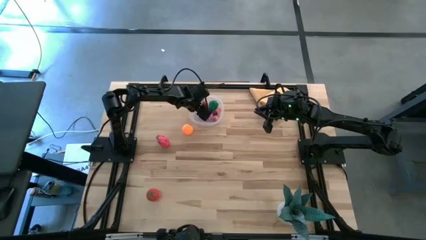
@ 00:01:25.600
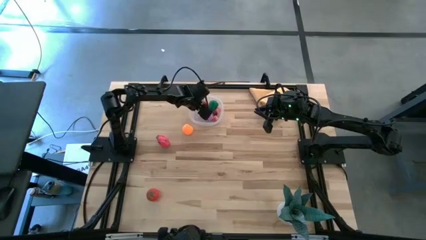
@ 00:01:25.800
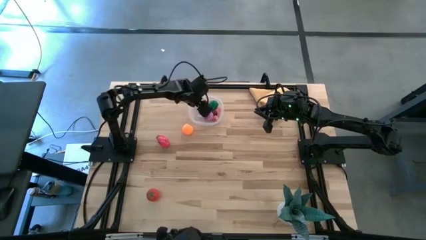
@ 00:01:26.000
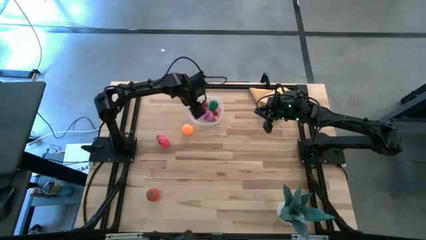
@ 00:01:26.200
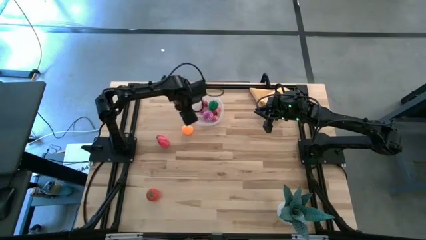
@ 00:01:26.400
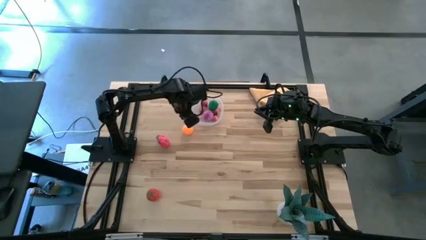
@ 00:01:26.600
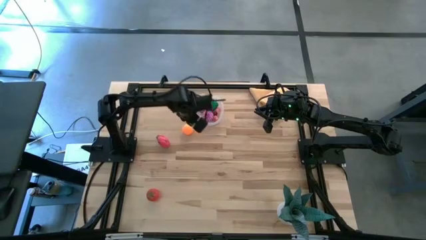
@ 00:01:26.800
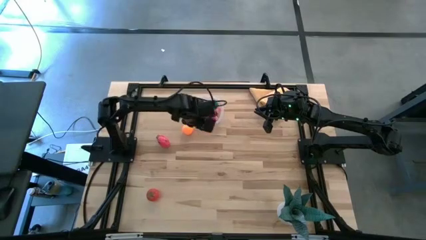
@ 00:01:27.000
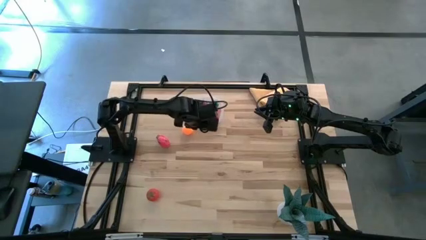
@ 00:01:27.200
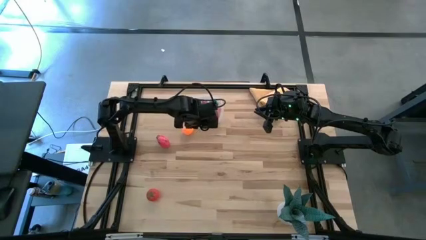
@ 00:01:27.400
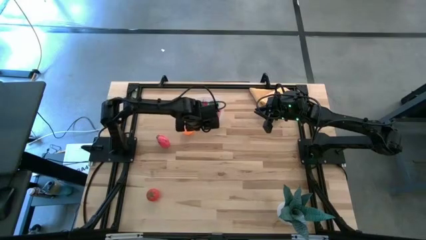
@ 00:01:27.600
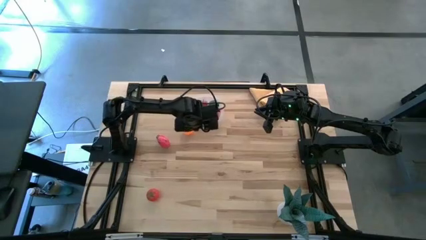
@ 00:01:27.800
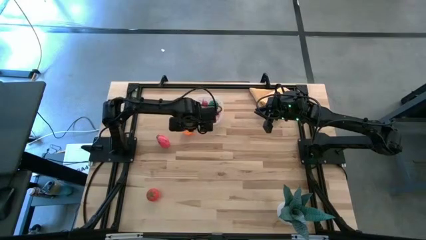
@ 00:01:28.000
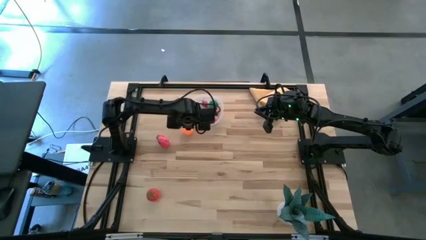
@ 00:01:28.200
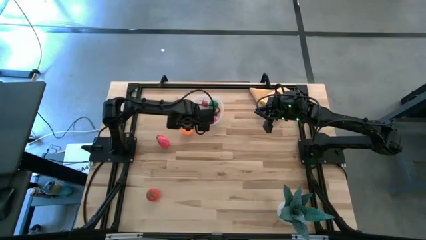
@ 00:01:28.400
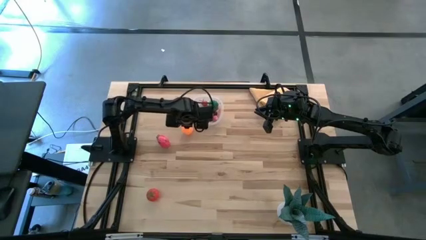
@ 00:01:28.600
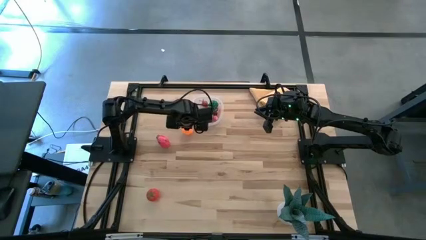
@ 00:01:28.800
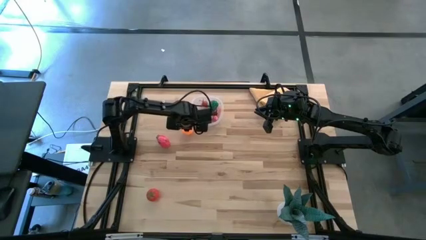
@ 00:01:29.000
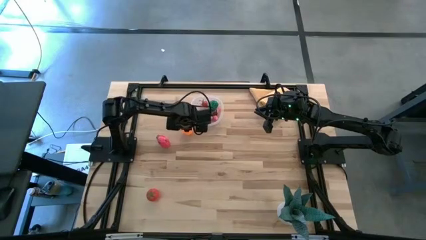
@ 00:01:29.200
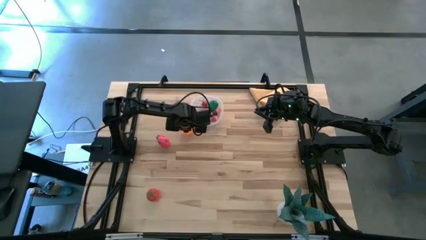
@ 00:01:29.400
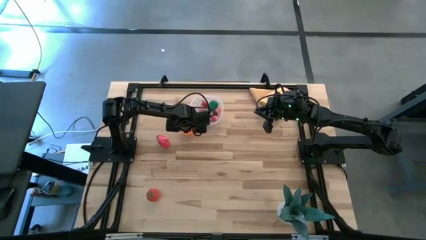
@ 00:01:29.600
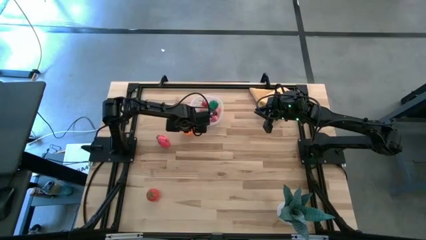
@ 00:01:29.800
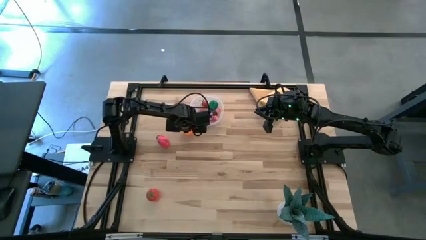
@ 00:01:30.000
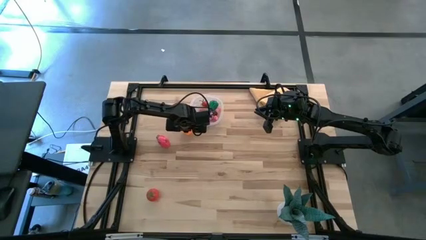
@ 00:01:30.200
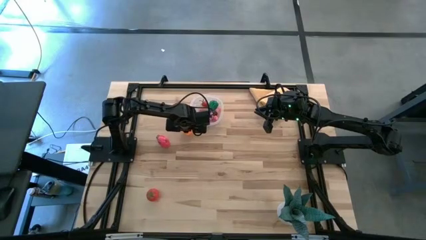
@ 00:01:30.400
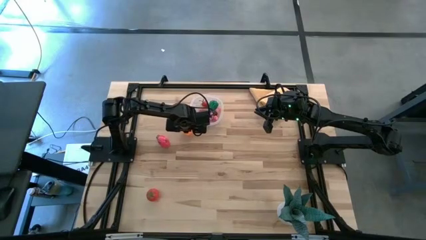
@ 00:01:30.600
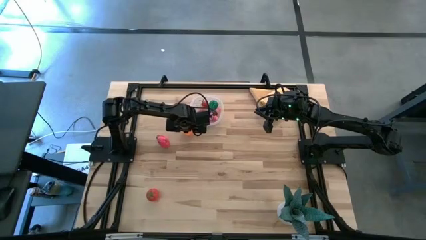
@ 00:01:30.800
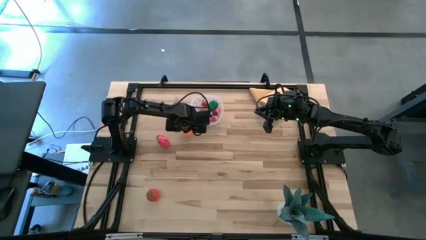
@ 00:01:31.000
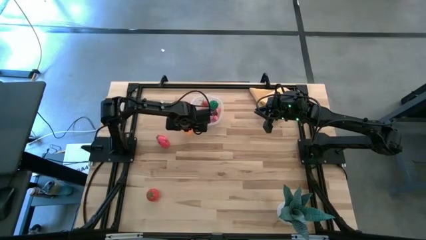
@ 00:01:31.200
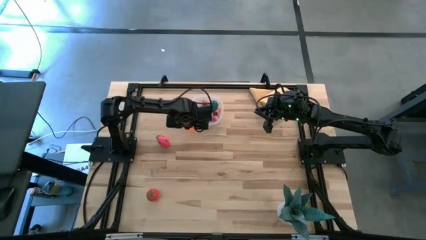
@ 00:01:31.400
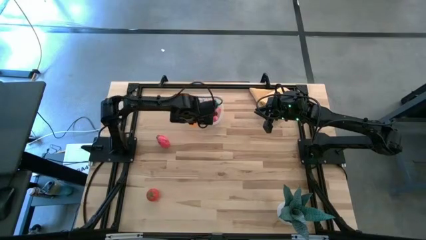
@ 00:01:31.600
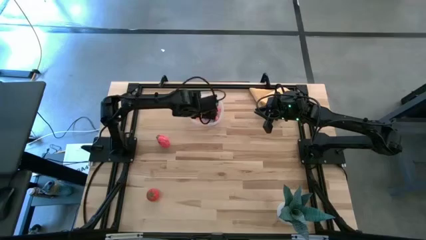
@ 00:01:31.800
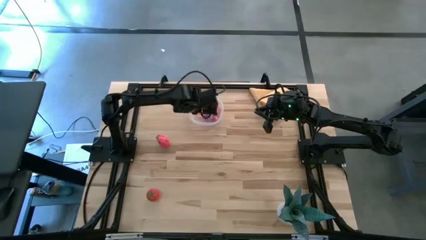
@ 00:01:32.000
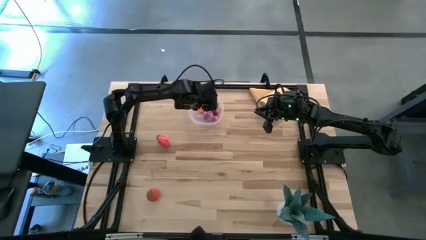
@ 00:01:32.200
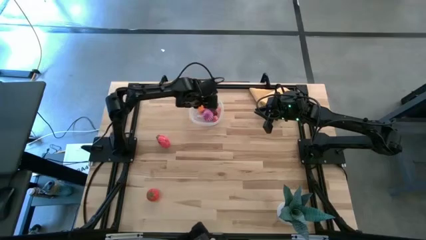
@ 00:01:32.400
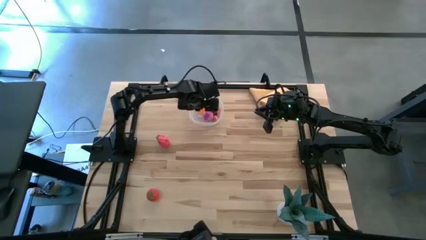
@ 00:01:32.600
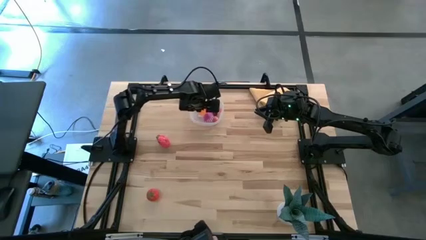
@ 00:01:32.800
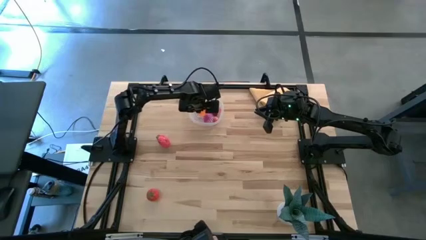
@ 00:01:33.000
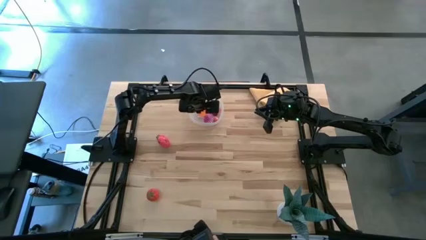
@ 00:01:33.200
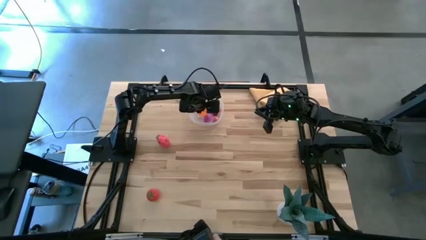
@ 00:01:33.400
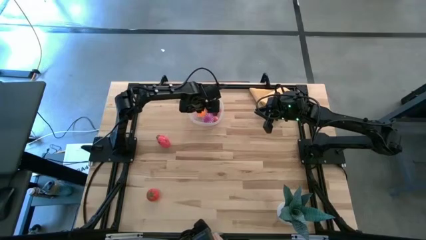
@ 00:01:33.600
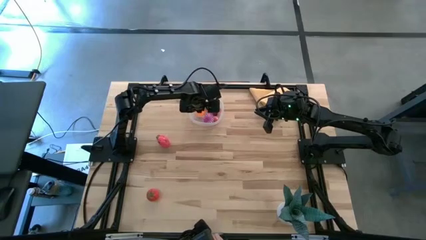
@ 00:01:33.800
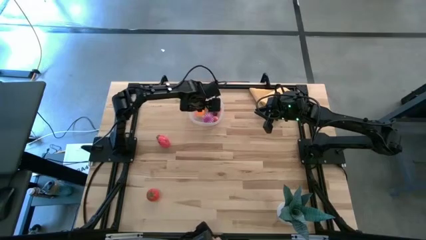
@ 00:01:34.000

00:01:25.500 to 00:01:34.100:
Task: Pick and placing Produce into tupperware
Put the orange into the transparent bin

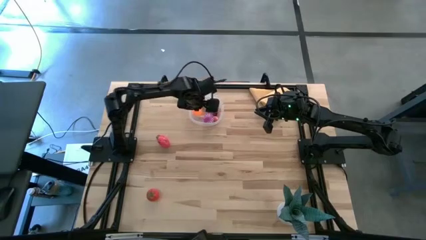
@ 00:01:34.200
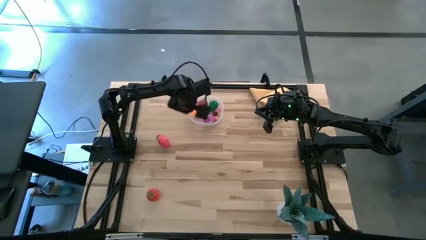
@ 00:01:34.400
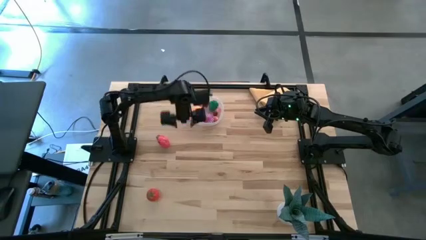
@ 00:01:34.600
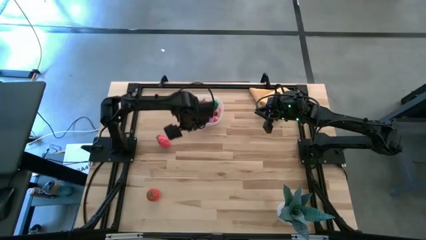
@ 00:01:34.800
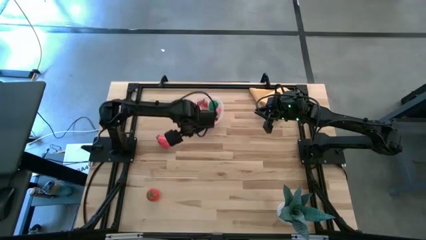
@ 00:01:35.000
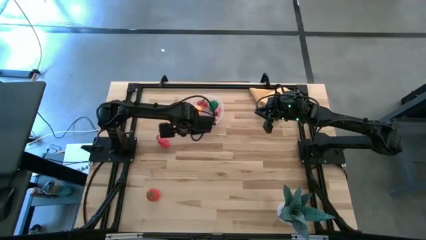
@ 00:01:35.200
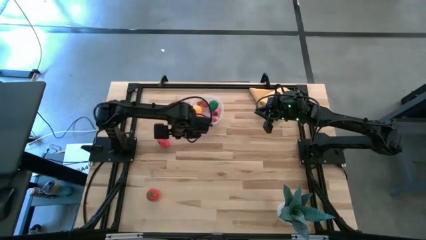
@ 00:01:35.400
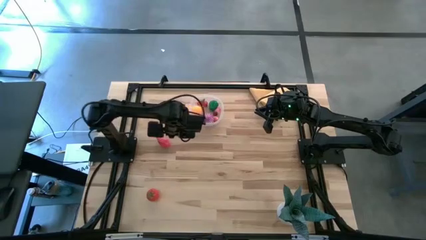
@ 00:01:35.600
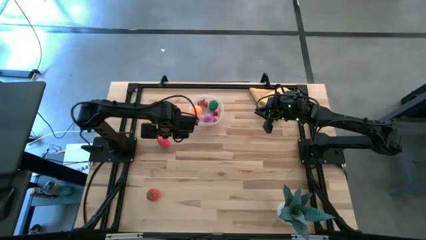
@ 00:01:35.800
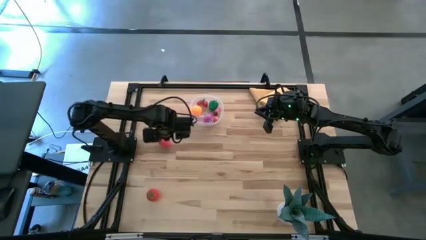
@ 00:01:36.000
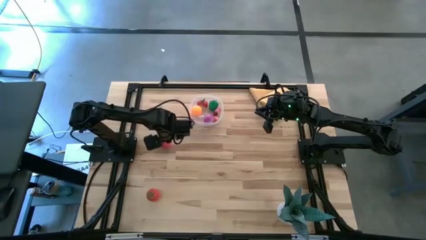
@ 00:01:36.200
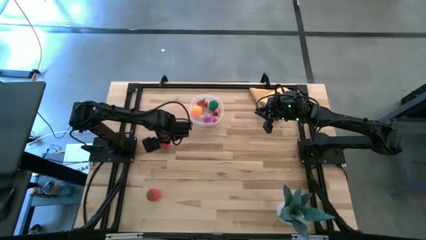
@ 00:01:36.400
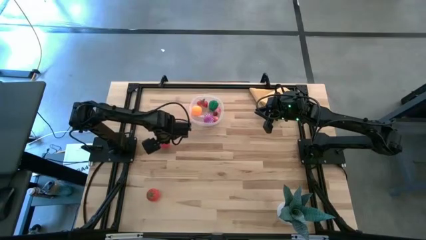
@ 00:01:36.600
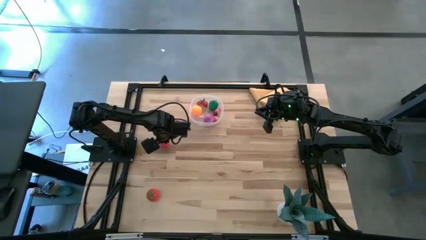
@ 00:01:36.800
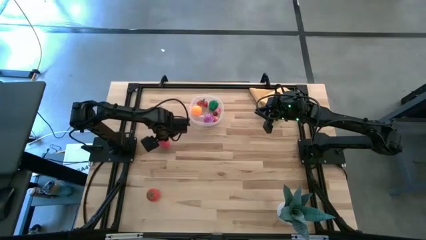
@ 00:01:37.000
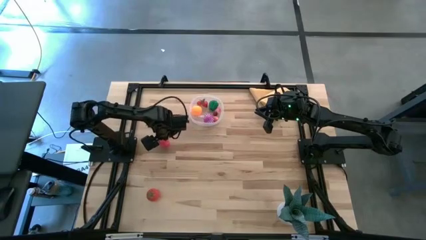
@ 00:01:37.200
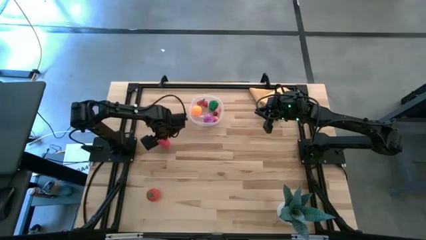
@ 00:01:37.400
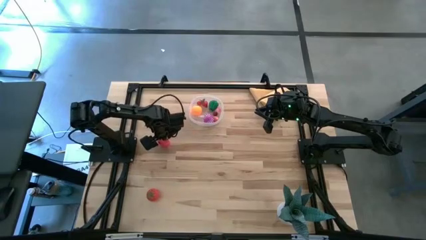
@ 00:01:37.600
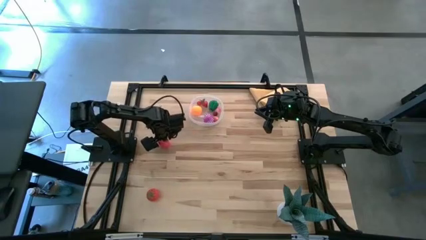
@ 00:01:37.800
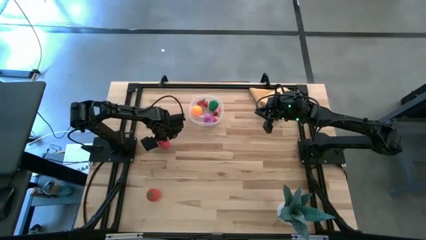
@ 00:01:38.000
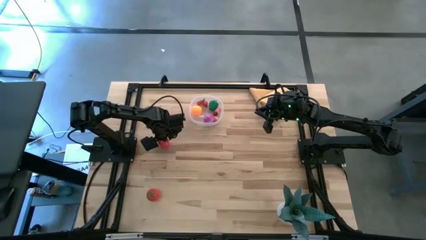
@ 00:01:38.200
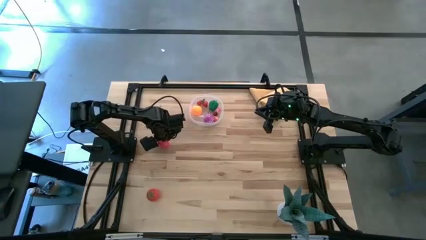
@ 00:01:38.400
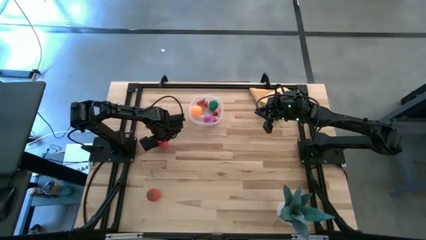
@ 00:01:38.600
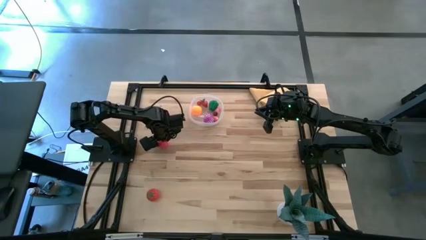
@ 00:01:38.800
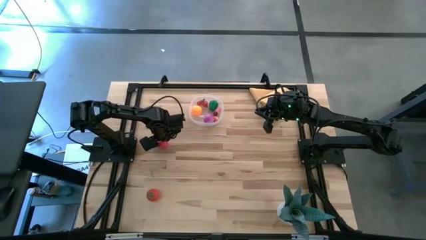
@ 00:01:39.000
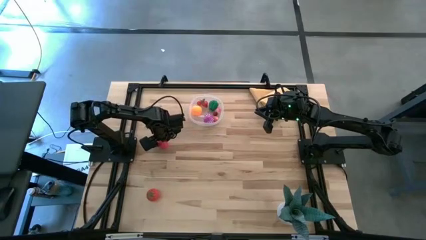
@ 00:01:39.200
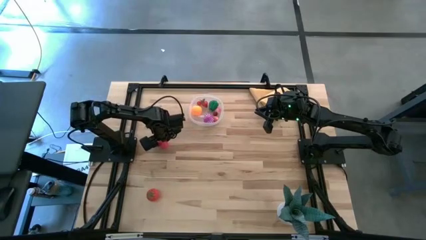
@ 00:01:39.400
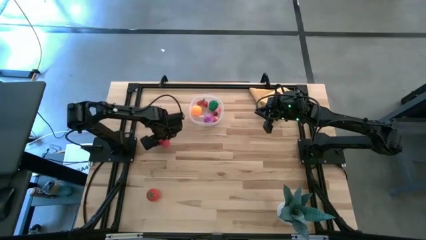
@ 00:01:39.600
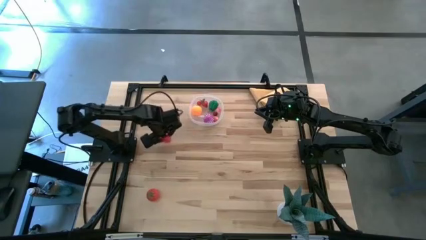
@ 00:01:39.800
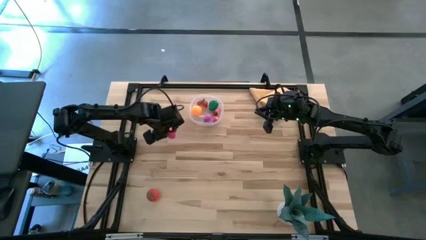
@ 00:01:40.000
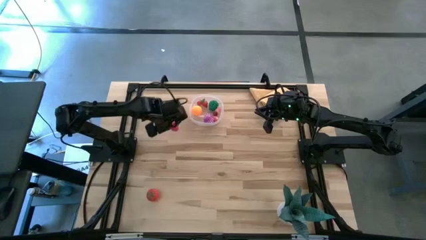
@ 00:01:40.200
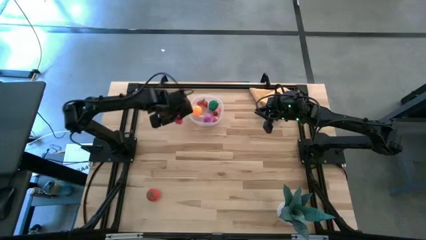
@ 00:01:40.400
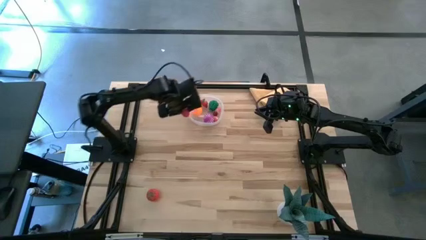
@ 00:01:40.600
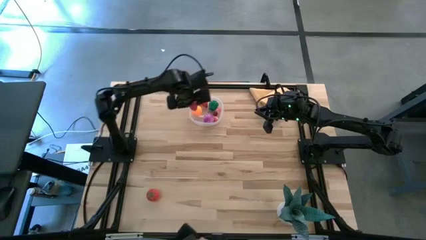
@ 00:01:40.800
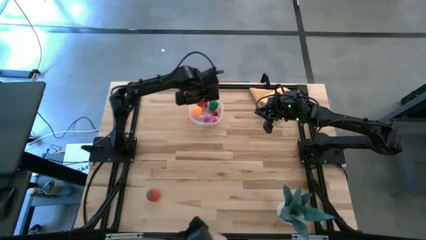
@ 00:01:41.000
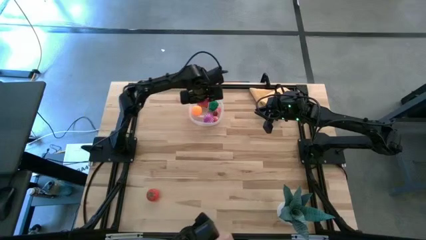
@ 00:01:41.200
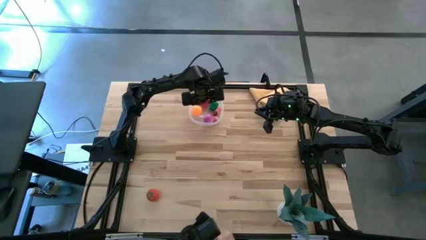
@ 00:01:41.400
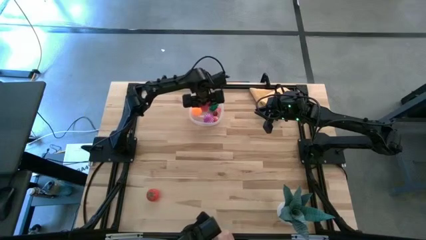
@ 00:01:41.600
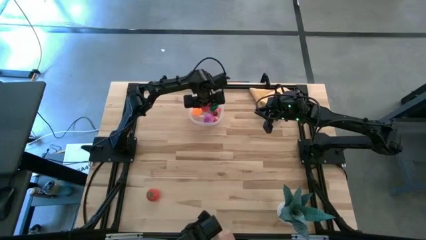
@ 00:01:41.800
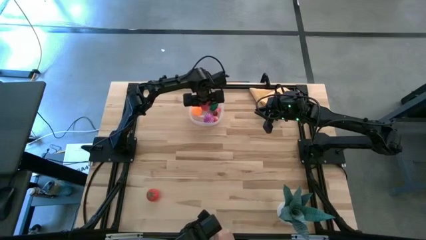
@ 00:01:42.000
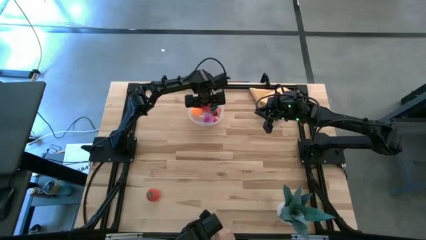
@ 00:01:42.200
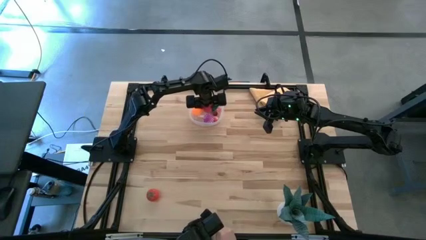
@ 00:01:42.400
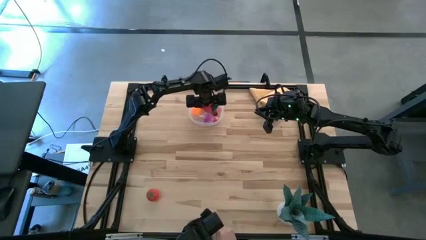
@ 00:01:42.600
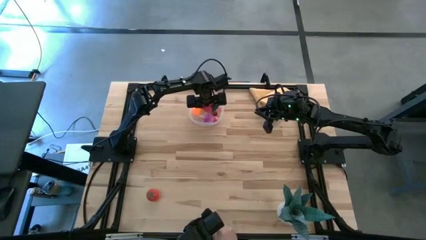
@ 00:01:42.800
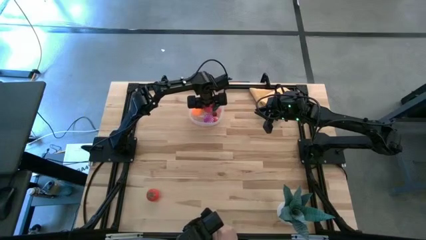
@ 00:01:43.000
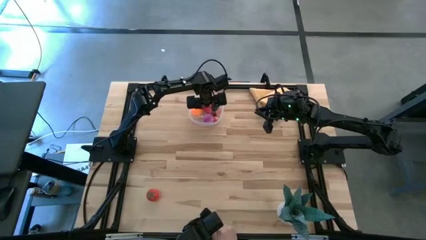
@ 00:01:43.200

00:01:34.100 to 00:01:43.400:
Put the red dragonfruit into the transparent bin
